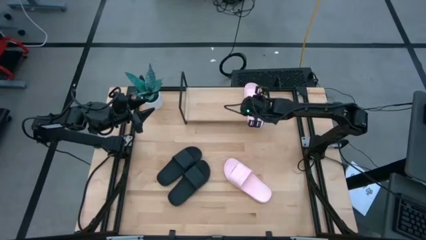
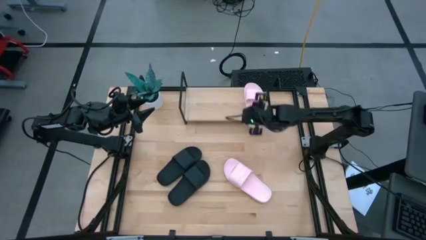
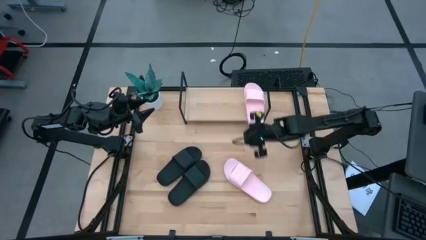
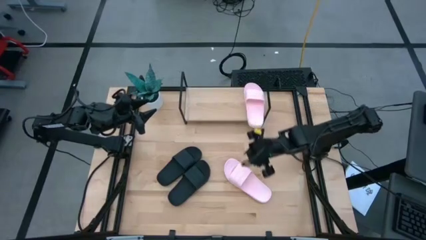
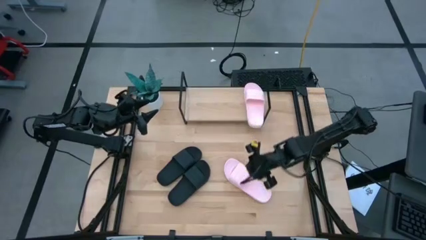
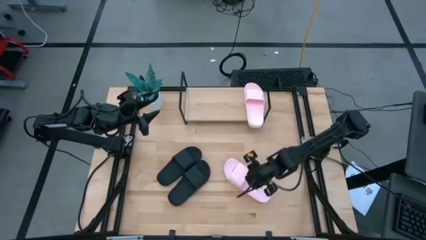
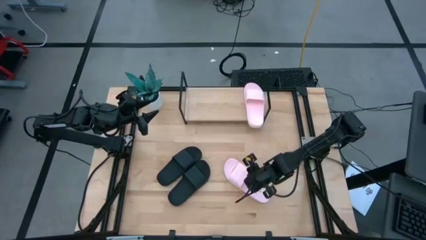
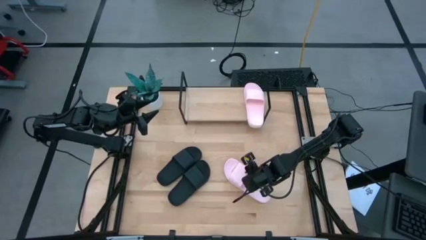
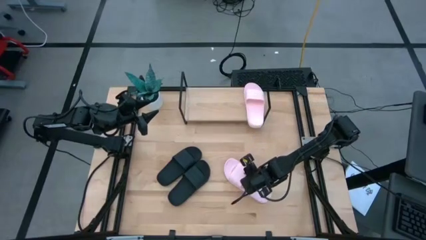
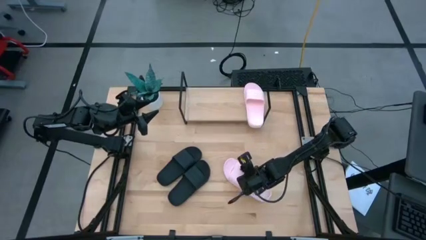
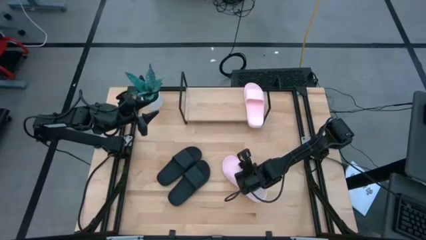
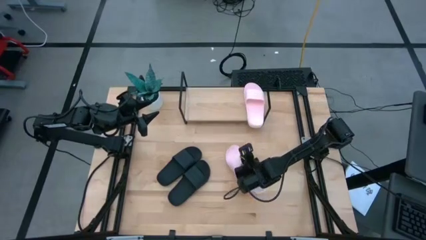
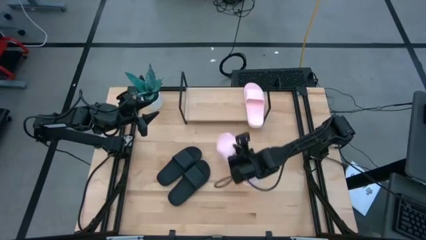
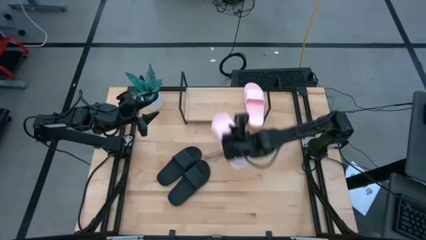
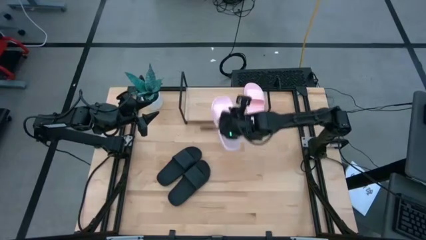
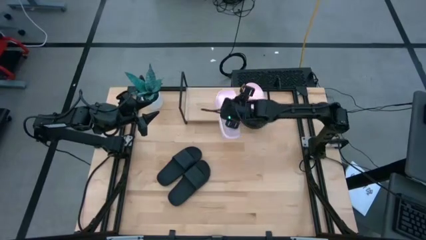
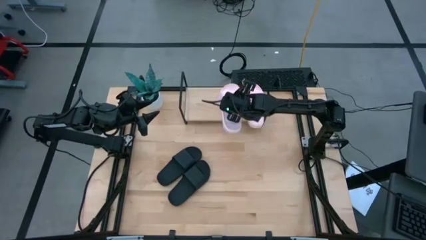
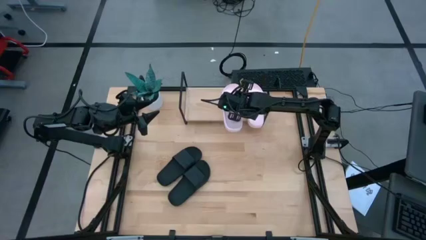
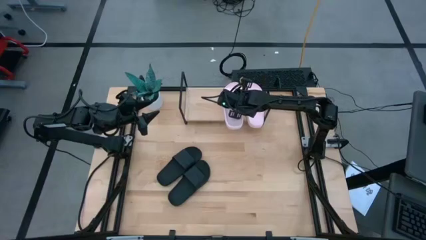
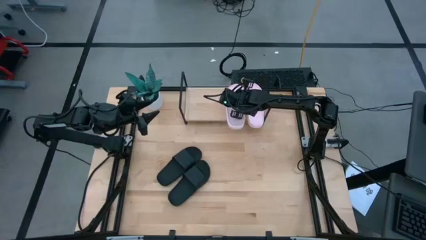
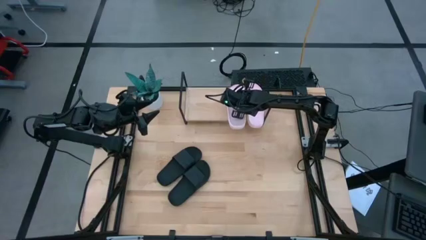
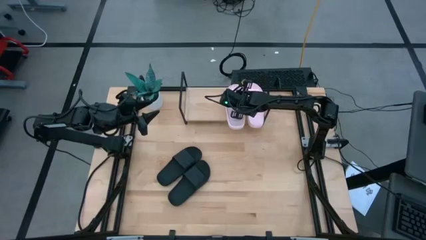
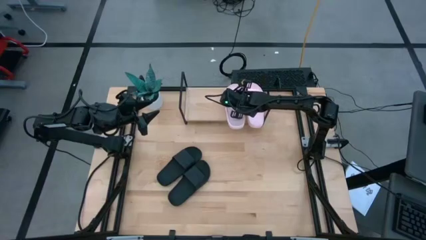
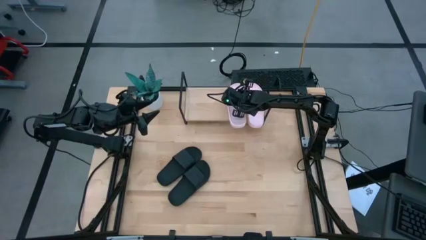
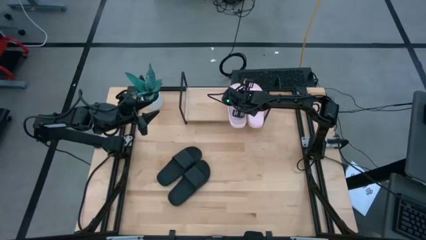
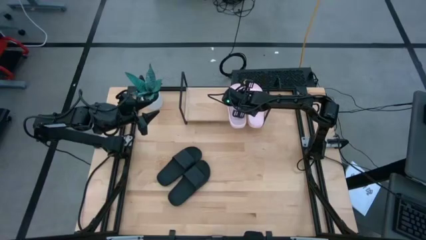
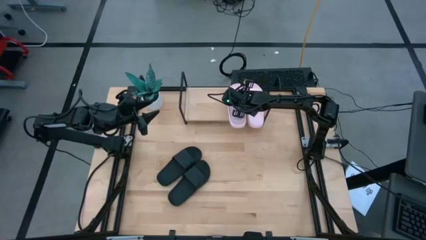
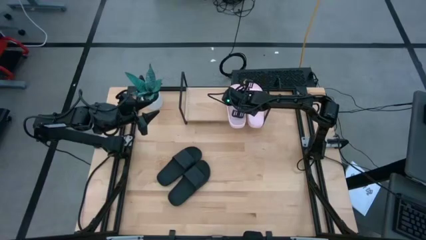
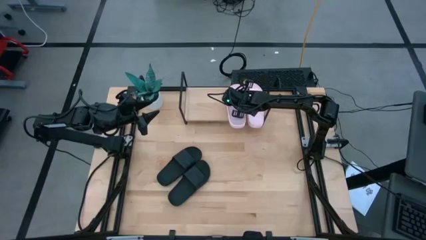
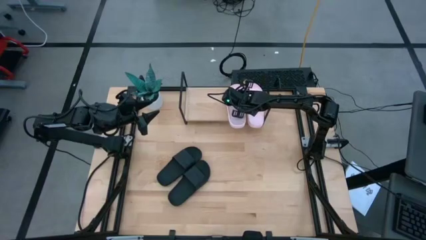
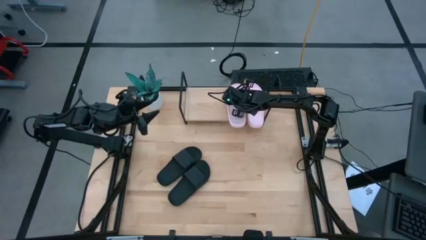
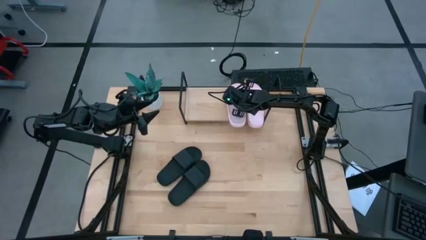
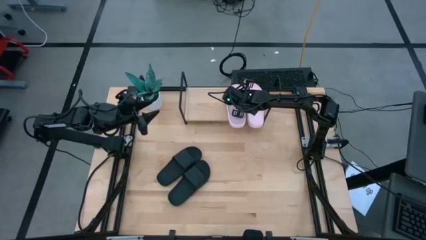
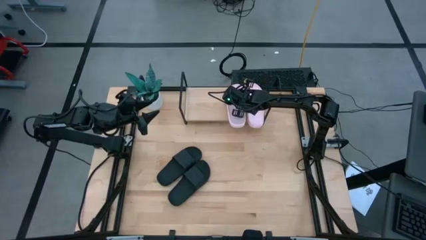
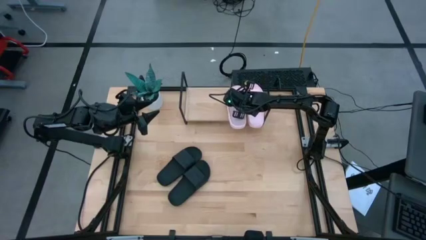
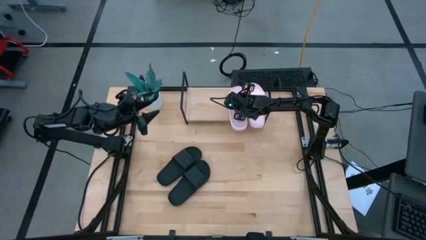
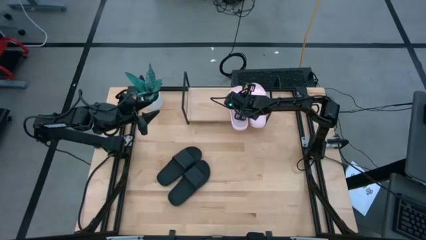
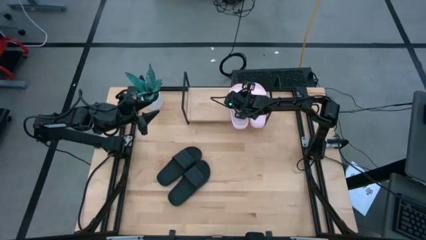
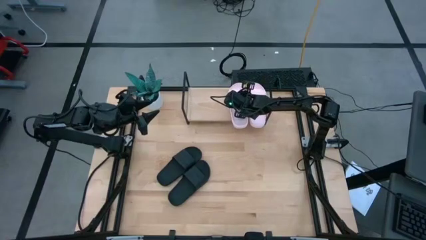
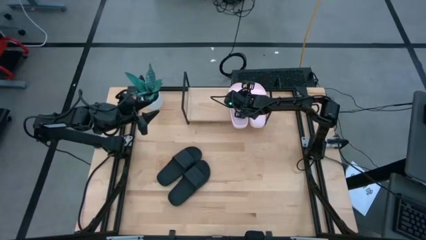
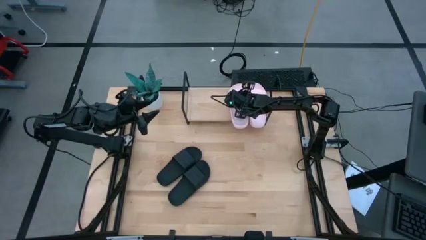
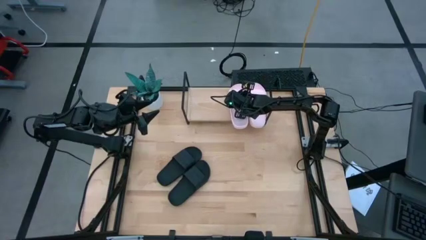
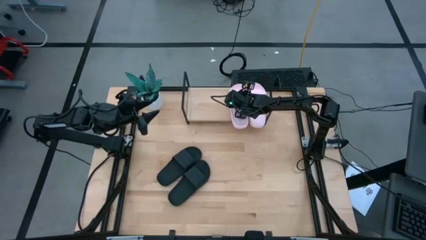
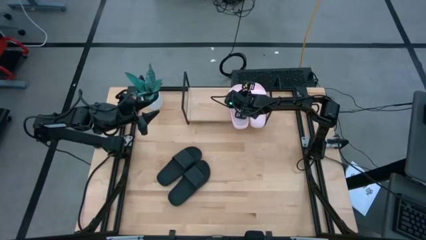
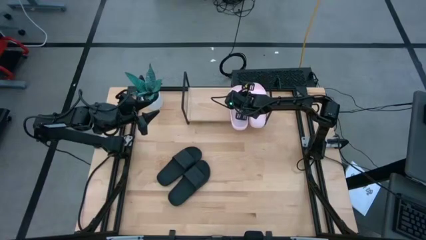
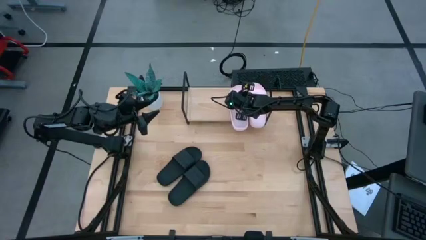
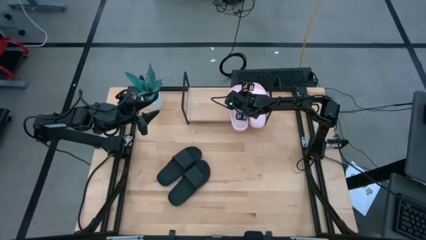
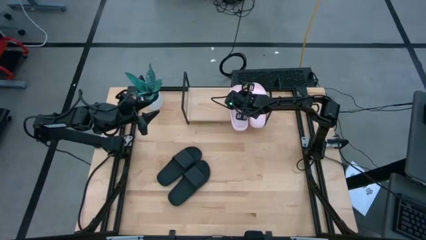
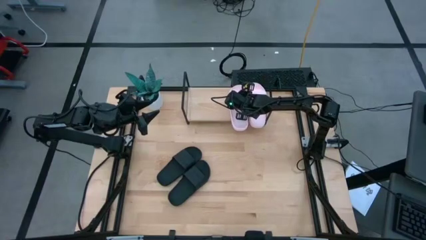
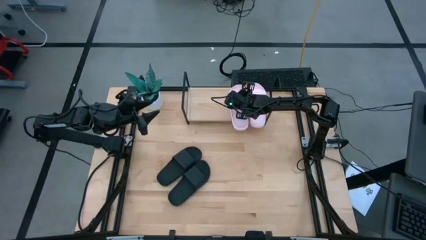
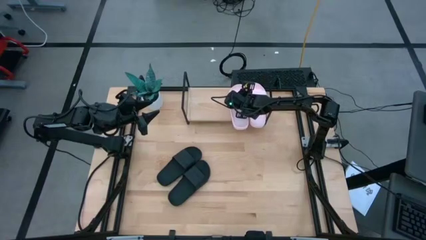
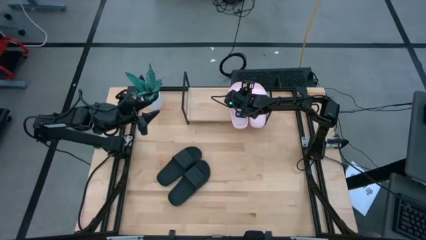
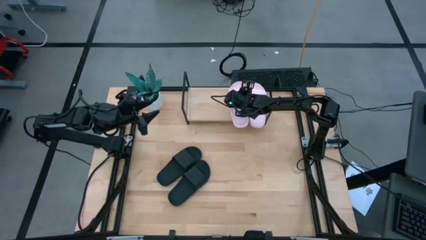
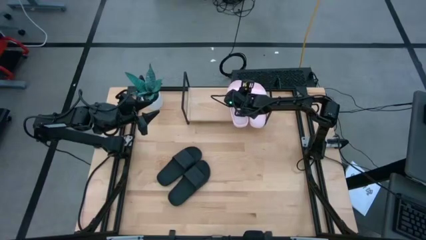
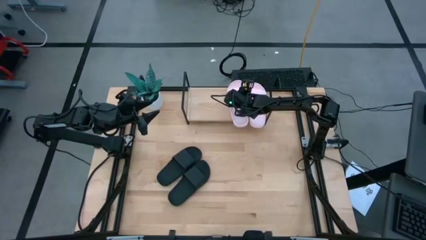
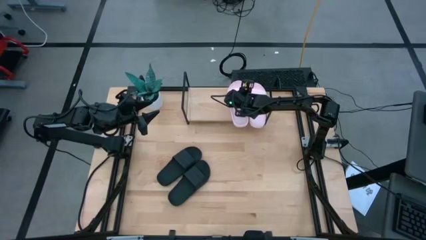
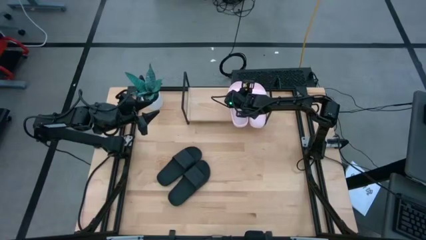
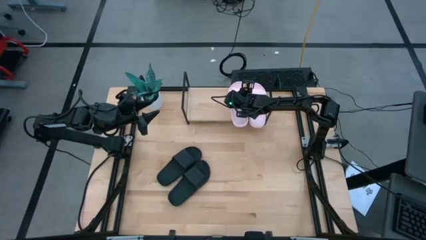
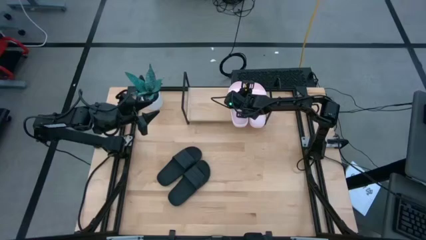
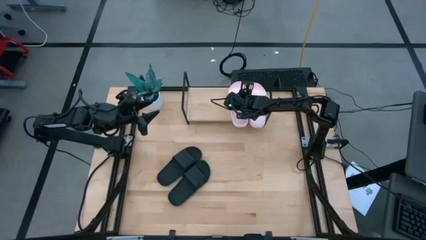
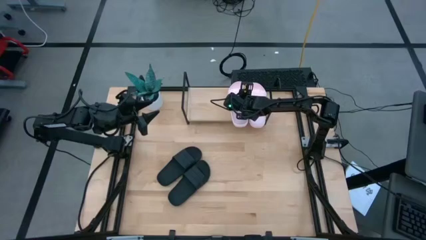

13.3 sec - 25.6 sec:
Task: Pick and place slides into the shelf
Put the pink slipper on the shelf

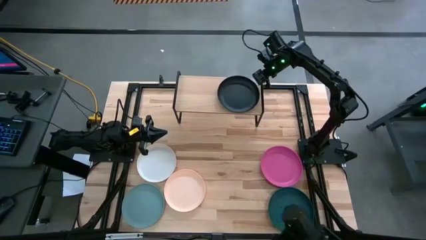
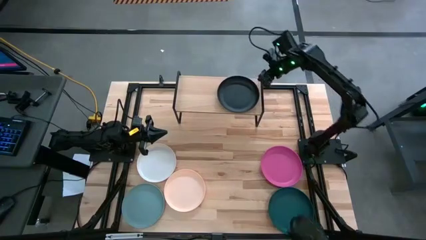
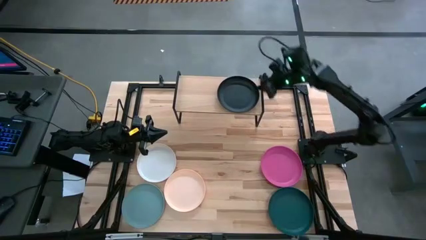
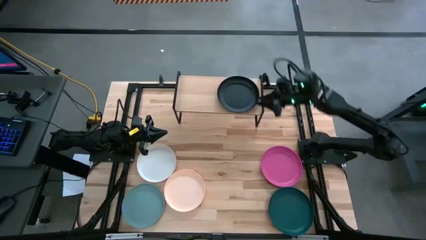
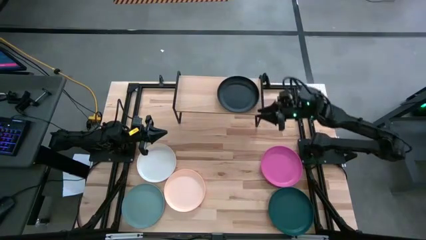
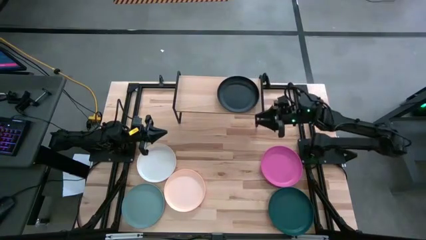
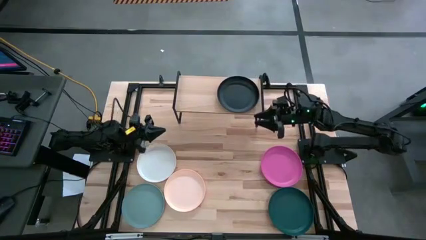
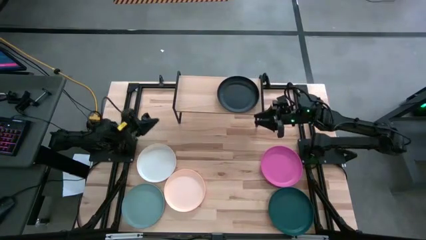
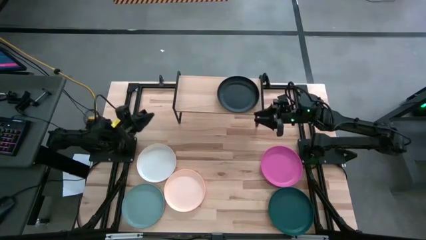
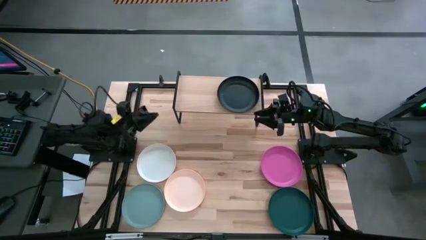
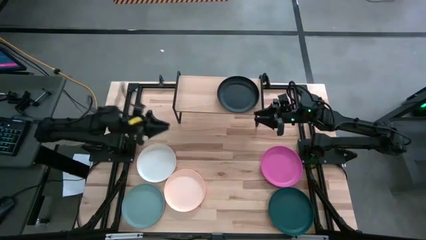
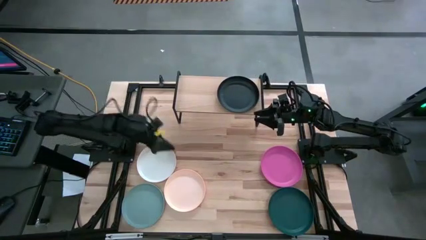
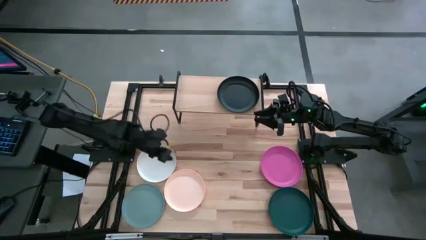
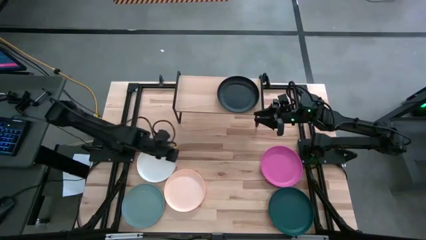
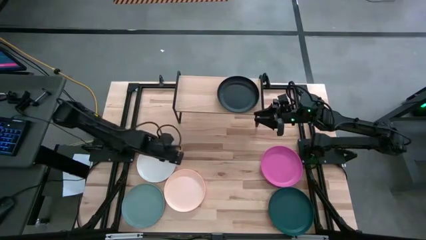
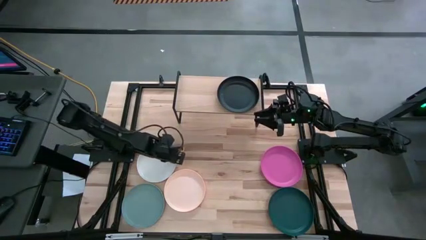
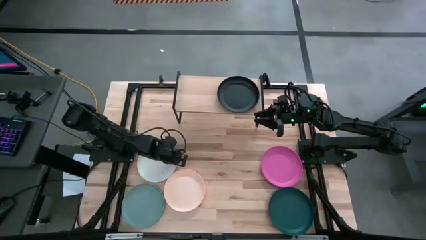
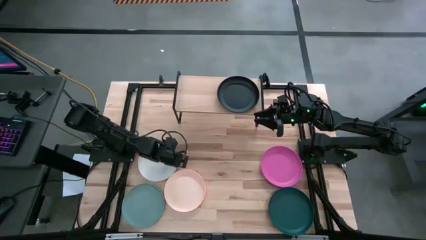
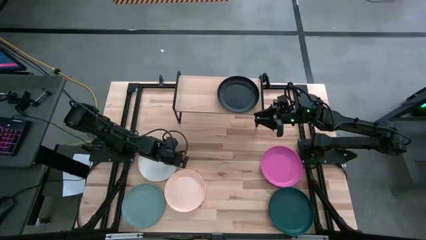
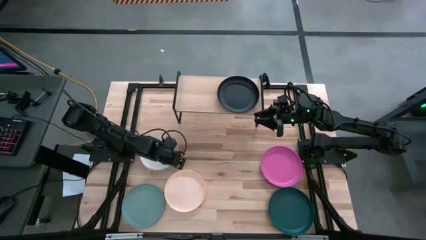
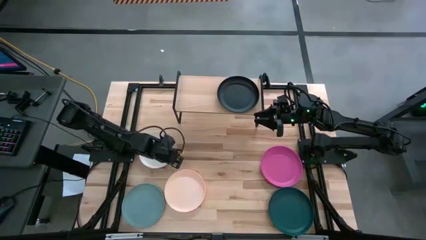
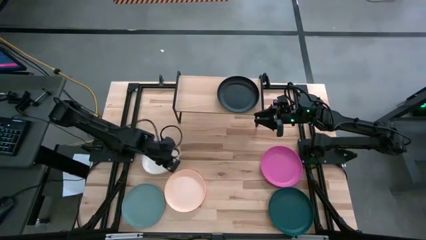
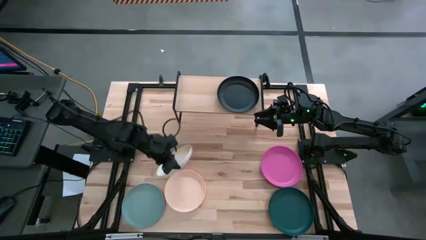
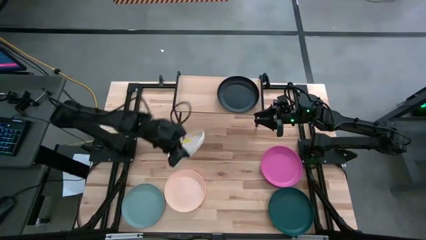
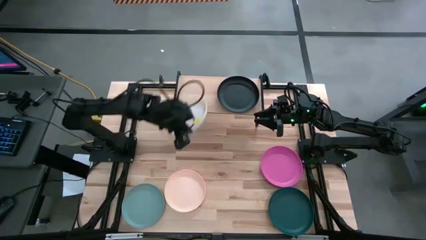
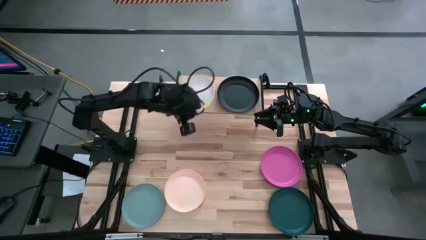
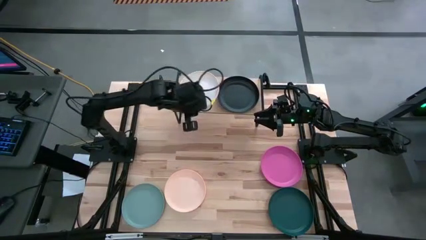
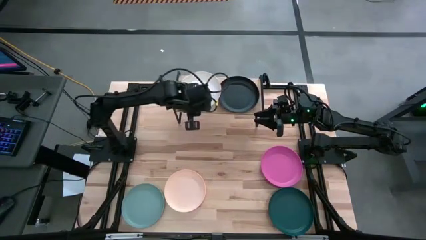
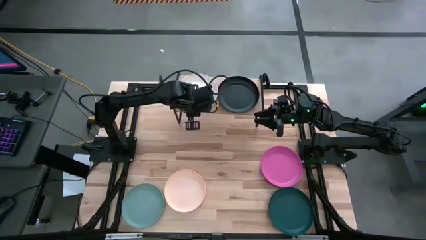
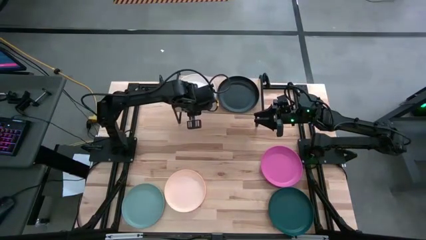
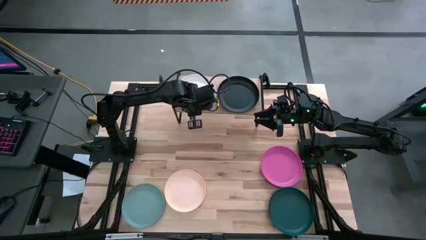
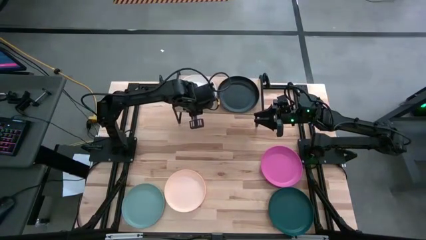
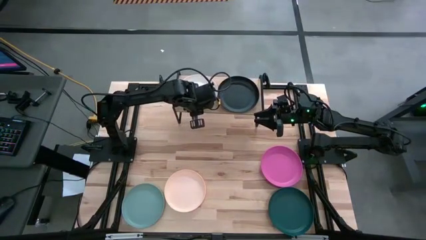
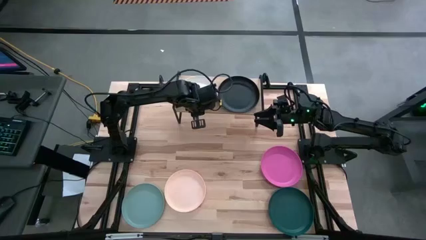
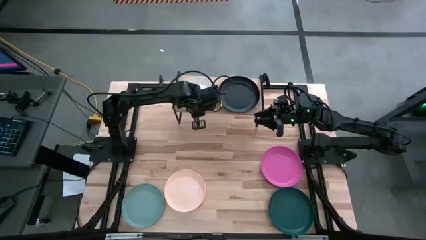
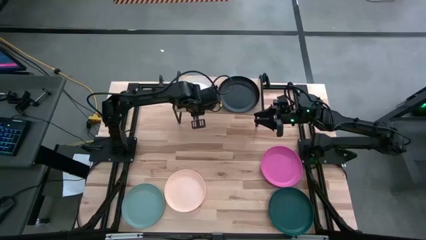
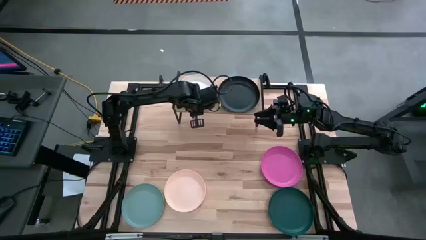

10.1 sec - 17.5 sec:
Task: Place and stack plates onto a shelf
Put the white plate on the shelf
